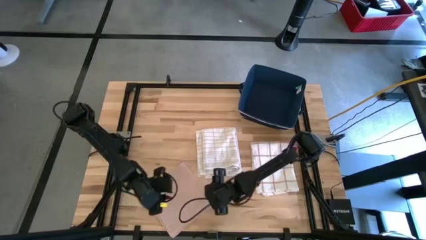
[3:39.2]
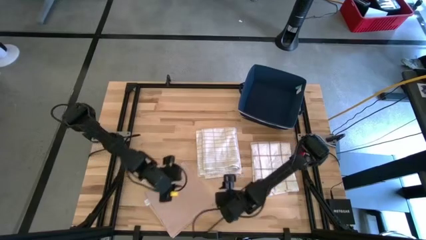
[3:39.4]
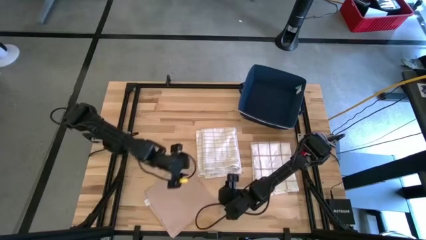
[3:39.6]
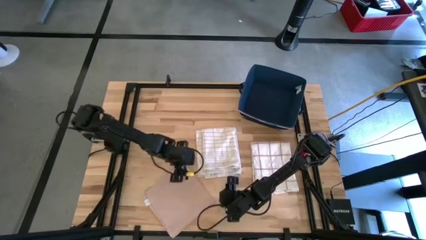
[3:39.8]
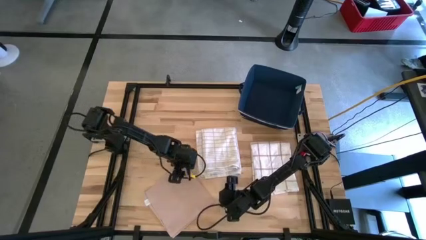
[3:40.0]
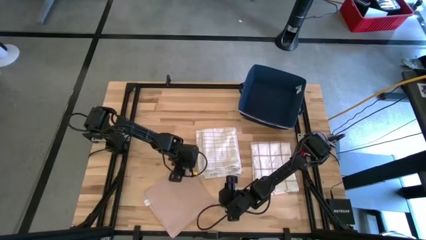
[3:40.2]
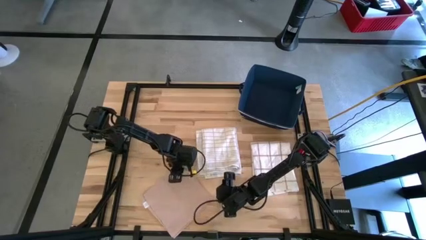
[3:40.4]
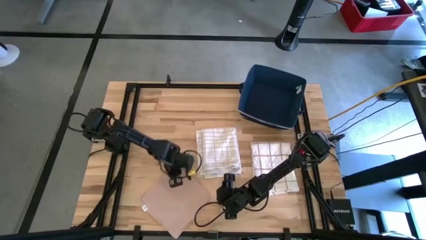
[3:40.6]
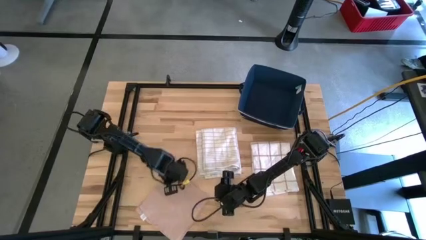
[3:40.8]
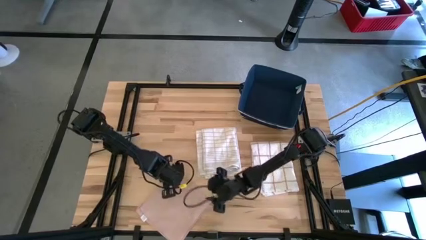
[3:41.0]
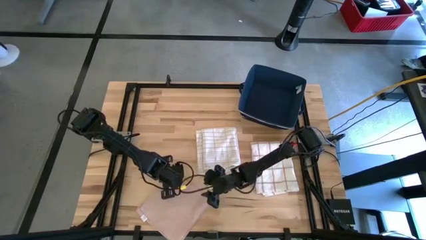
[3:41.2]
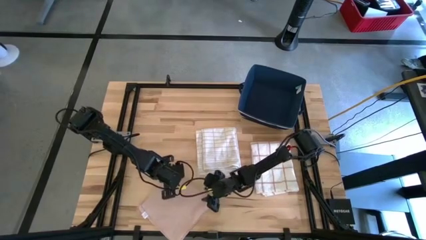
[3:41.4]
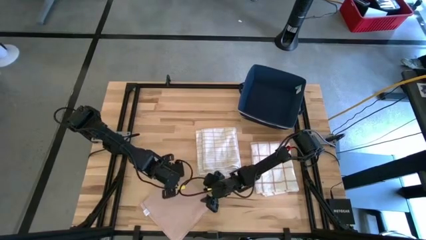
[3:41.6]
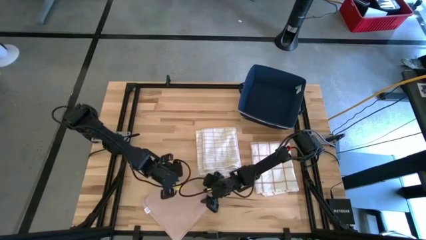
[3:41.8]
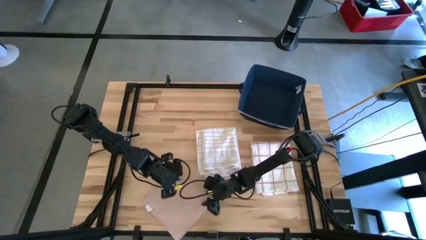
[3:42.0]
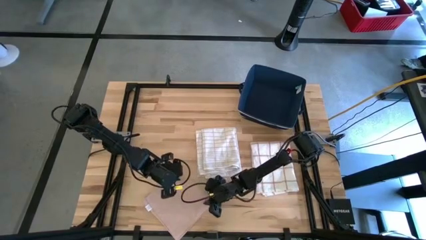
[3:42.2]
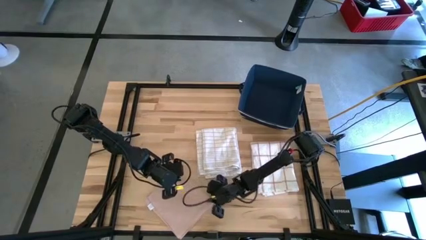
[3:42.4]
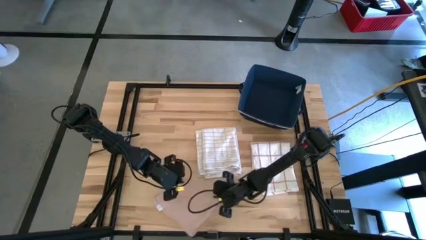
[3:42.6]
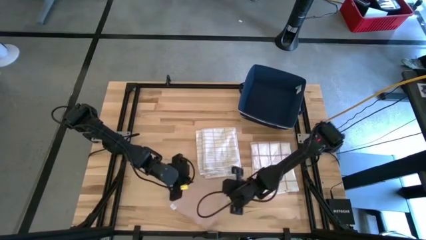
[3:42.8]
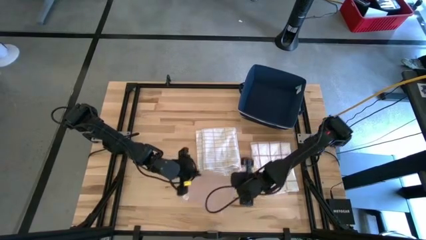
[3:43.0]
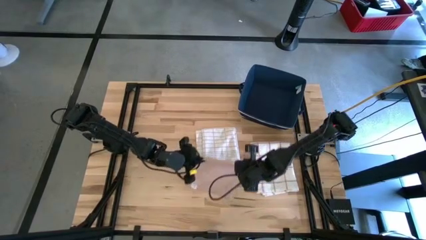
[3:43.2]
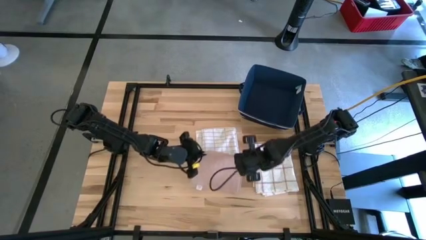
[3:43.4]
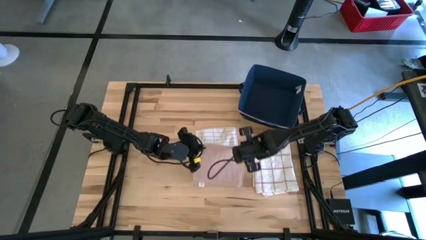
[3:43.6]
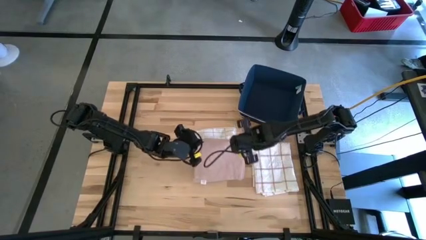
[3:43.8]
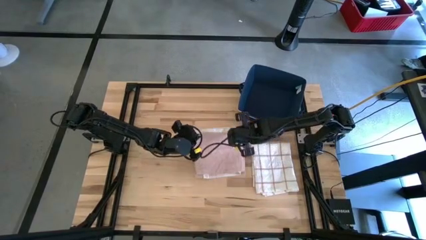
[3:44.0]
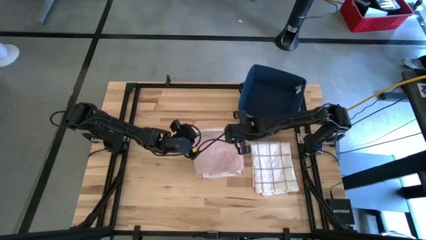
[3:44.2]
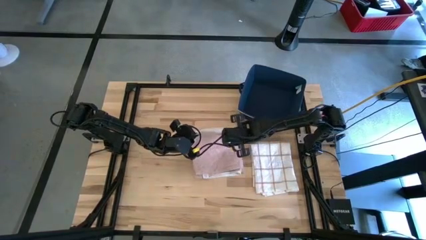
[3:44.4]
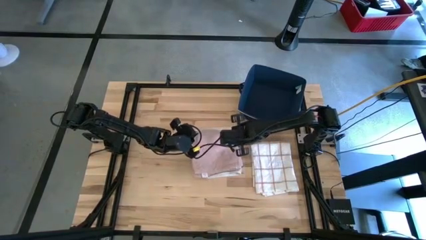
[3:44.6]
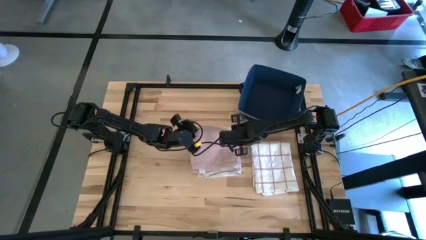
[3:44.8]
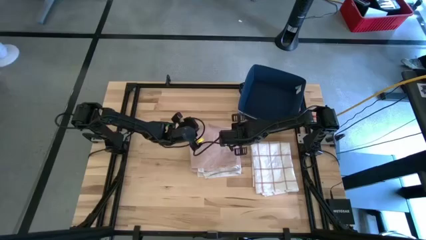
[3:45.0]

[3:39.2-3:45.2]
Task: Fold towel
Stack the pink towel on the top white with gray-stripe towel

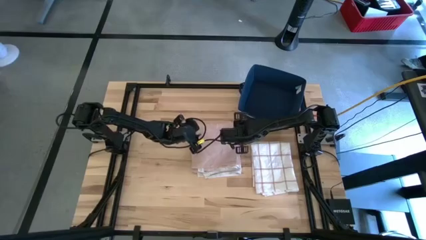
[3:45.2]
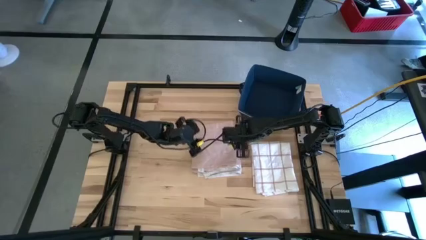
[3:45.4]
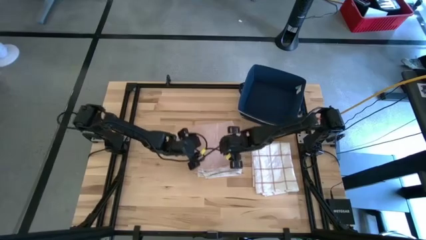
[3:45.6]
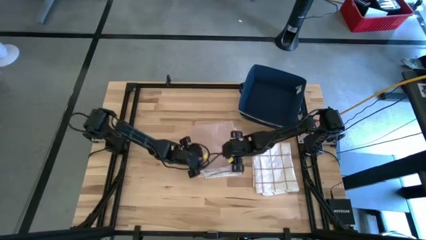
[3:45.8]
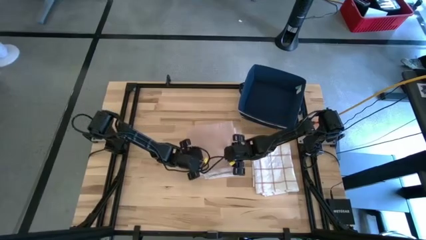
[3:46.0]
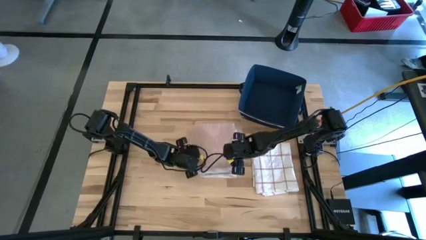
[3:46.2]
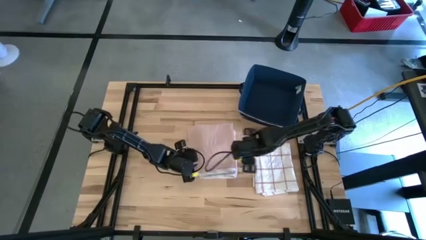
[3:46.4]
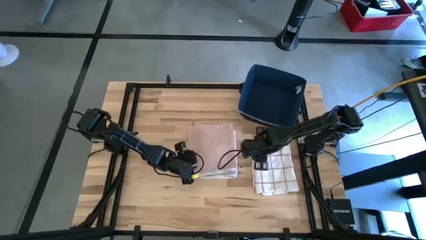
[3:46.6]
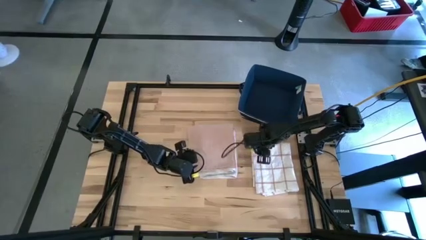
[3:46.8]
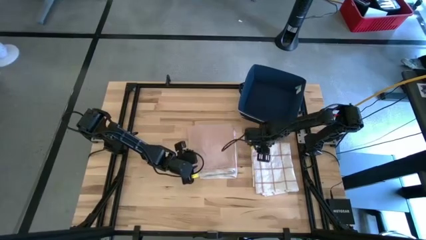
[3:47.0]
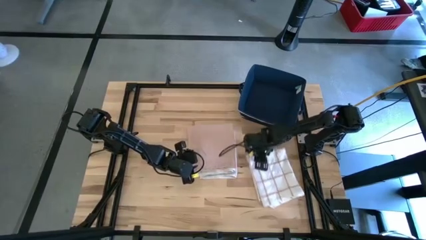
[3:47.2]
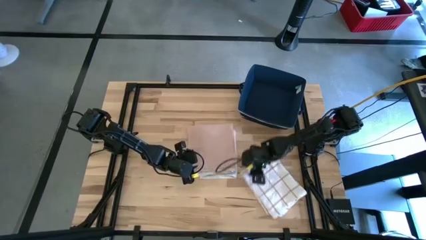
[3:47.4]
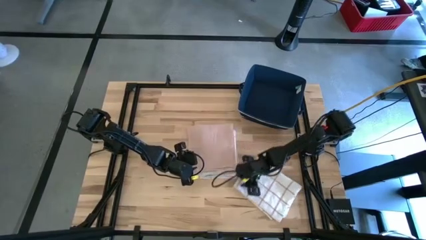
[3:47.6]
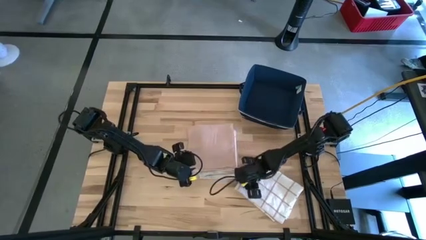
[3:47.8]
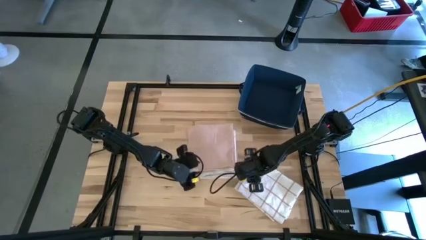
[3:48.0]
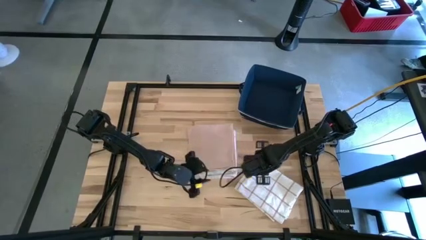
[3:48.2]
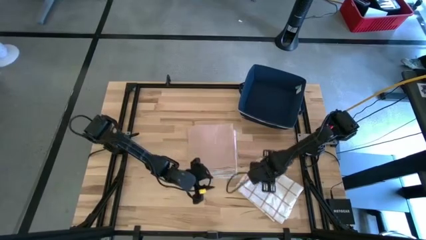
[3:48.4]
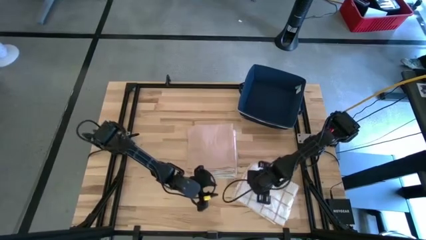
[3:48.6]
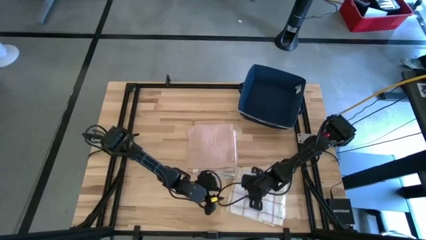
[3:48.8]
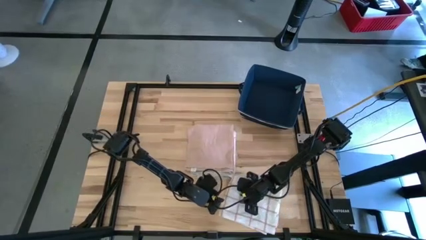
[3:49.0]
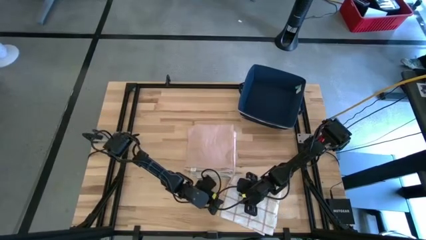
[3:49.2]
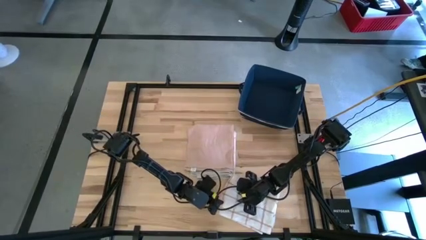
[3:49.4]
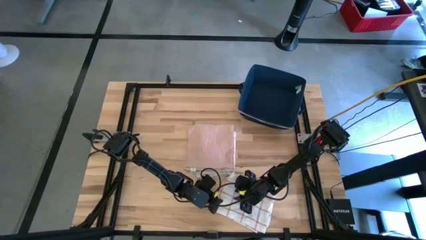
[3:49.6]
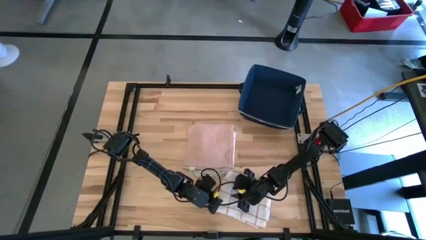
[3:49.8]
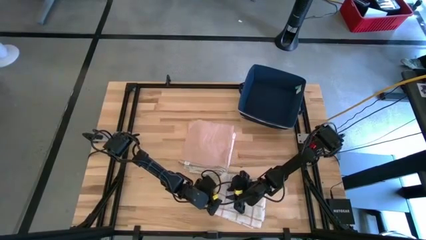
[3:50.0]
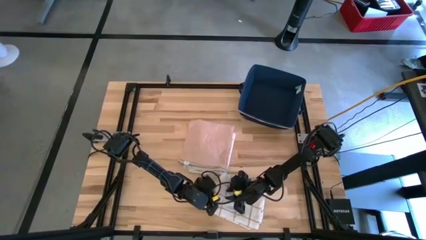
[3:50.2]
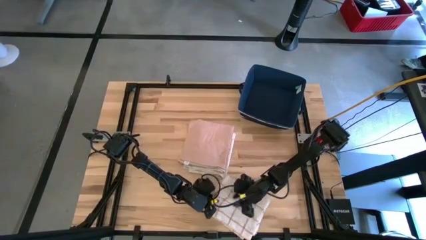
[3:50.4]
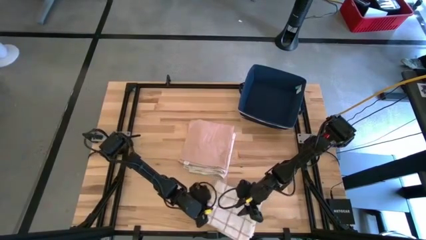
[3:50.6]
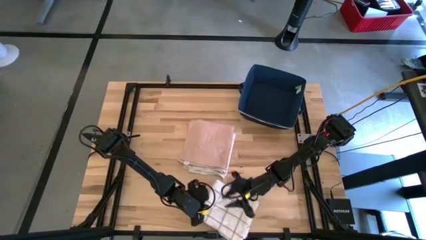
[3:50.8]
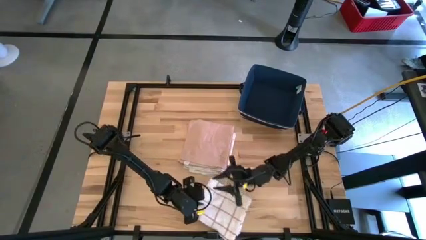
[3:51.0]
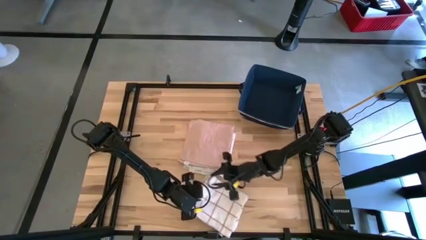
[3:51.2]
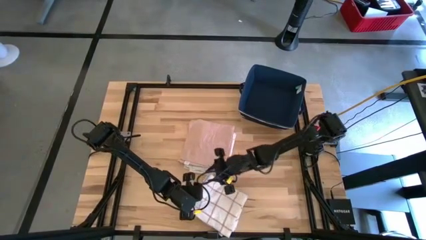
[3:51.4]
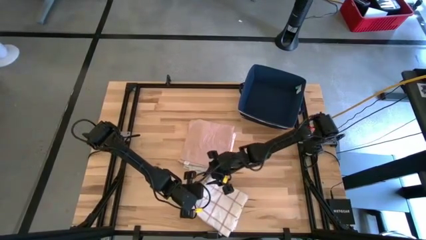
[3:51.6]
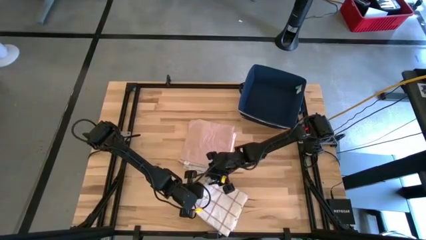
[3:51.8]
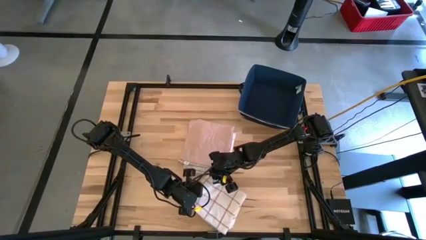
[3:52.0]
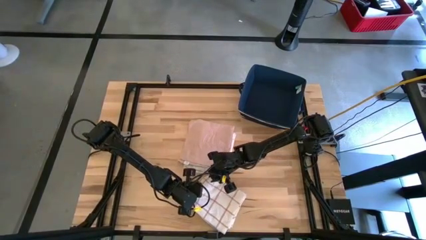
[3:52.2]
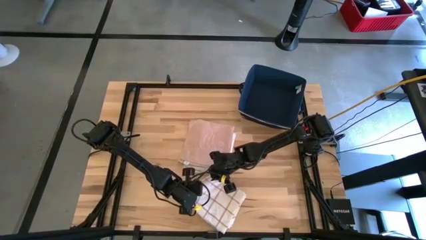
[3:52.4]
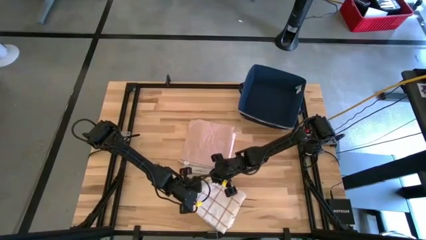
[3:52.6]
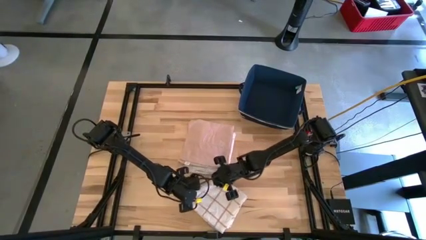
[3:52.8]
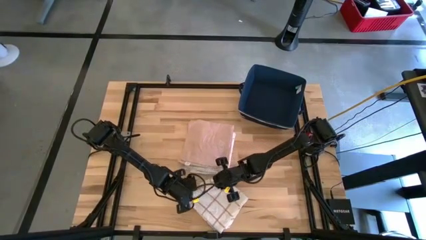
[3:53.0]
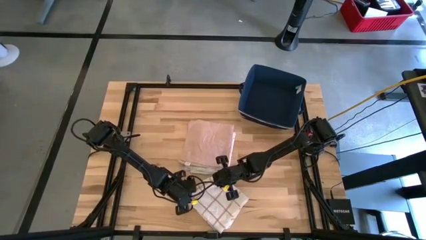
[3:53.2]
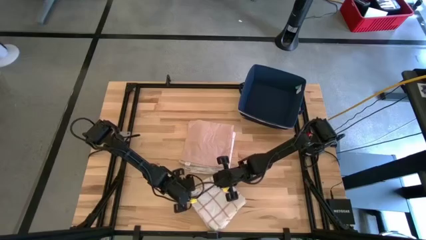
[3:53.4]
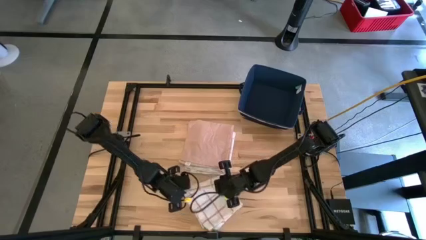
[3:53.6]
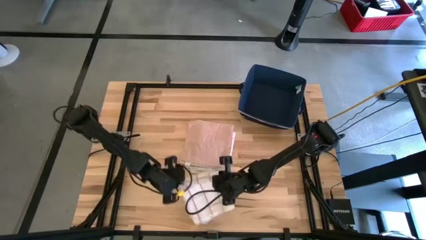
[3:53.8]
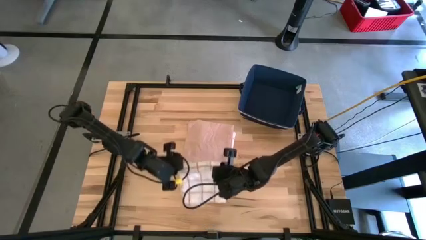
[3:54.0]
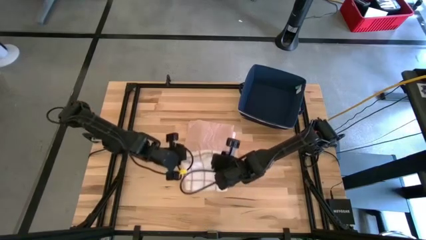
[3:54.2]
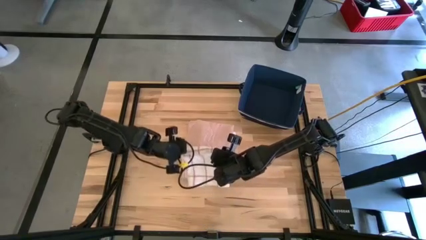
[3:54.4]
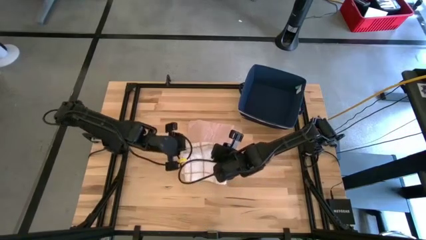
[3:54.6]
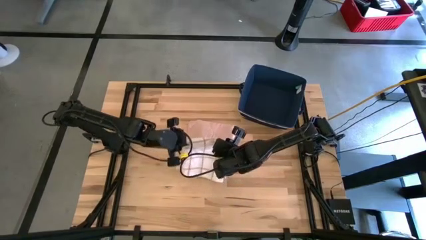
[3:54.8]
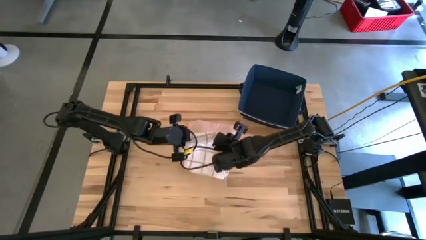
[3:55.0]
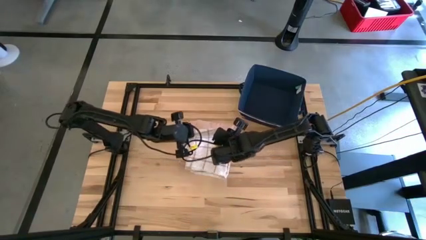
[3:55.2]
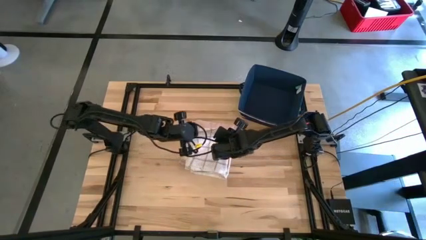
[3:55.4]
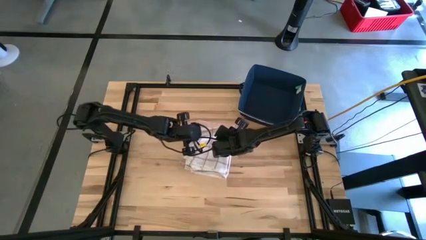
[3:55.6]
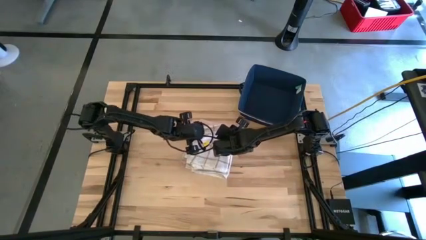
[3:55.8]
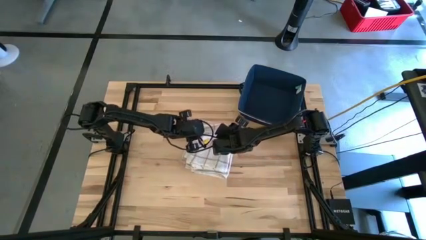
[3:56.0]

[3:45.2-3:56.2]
Stack the white with red-stripe towel on top of the pink towel
